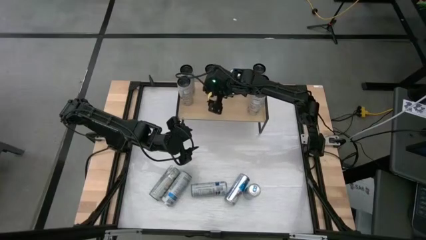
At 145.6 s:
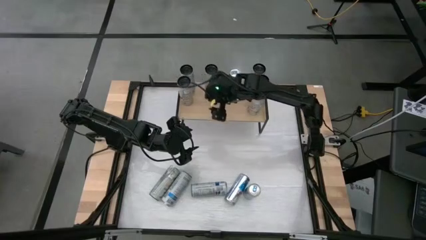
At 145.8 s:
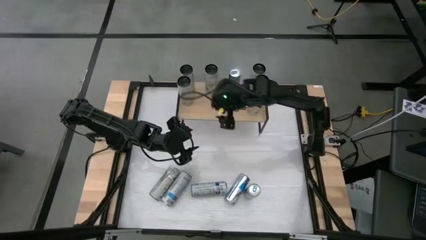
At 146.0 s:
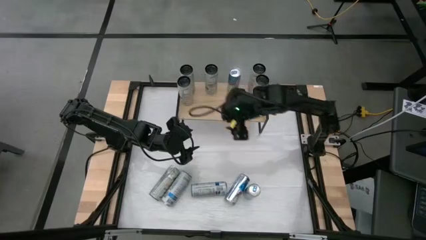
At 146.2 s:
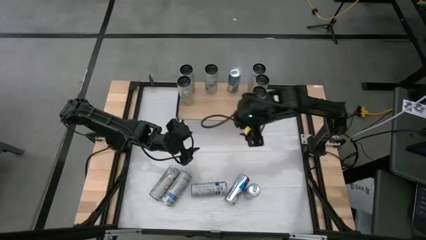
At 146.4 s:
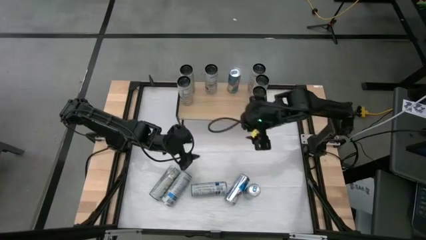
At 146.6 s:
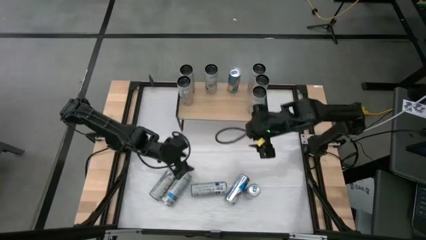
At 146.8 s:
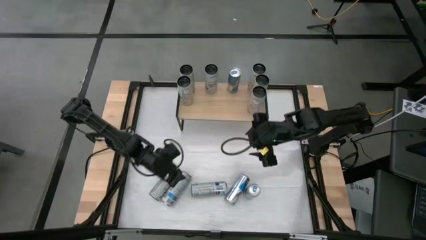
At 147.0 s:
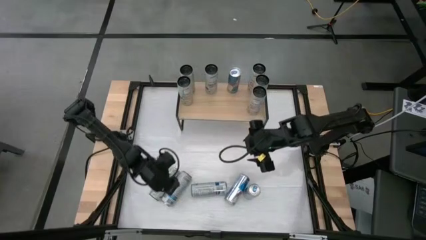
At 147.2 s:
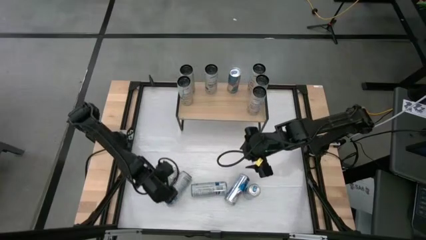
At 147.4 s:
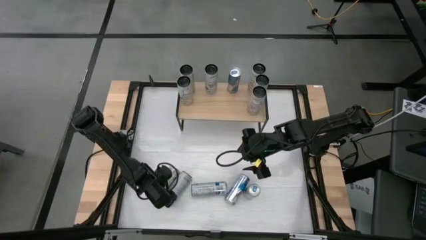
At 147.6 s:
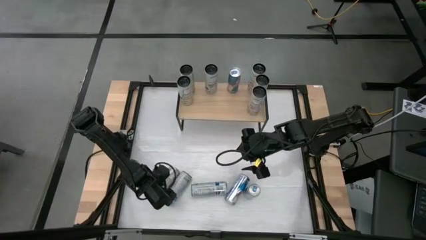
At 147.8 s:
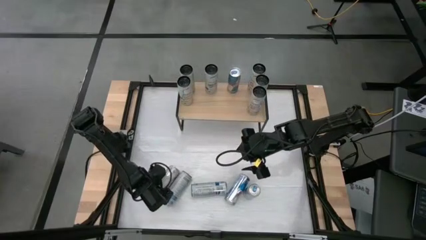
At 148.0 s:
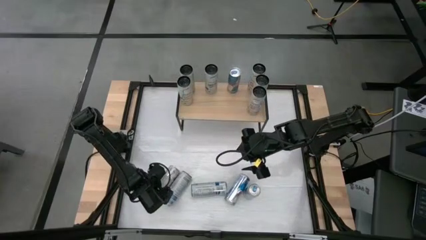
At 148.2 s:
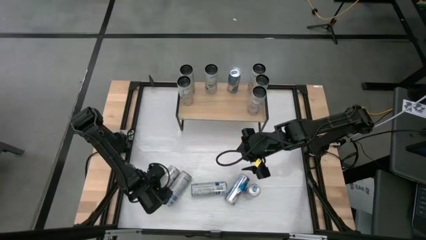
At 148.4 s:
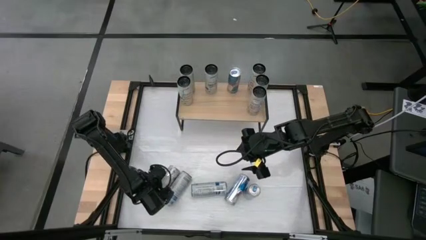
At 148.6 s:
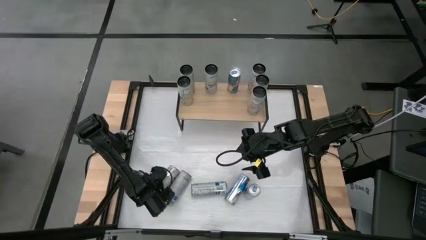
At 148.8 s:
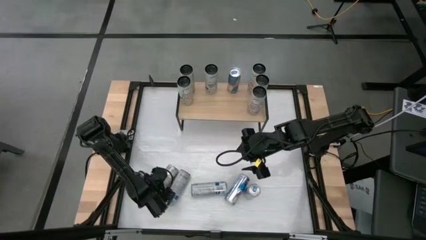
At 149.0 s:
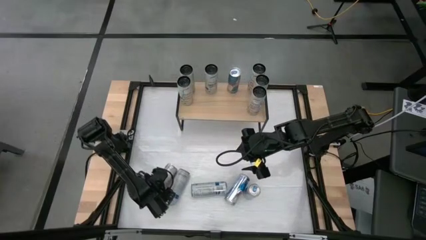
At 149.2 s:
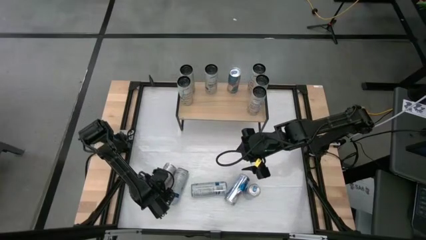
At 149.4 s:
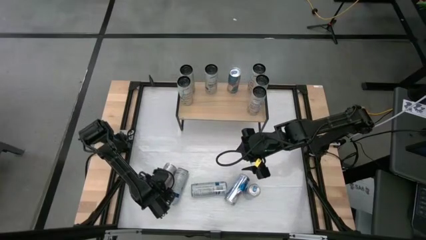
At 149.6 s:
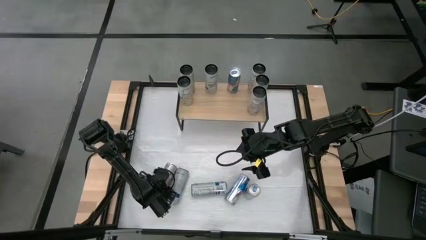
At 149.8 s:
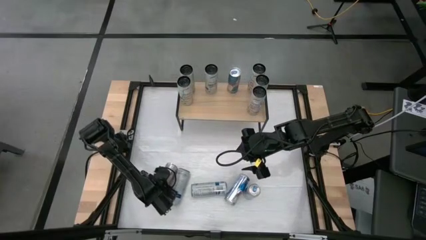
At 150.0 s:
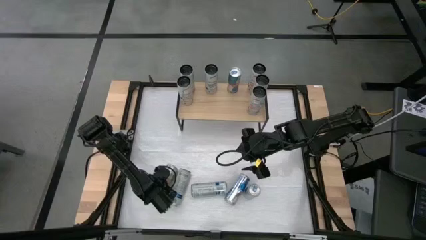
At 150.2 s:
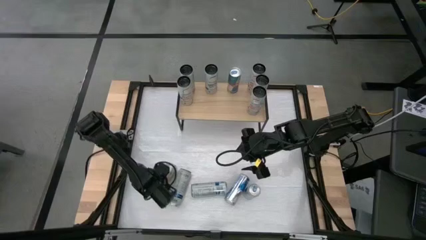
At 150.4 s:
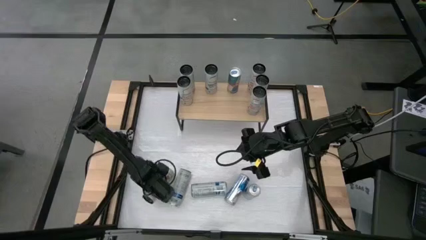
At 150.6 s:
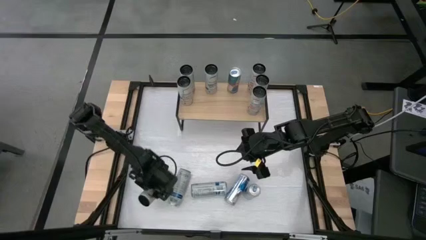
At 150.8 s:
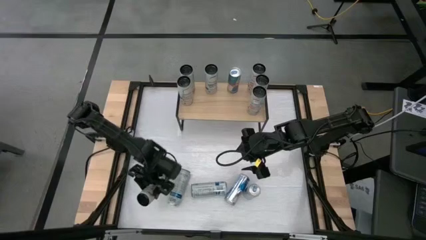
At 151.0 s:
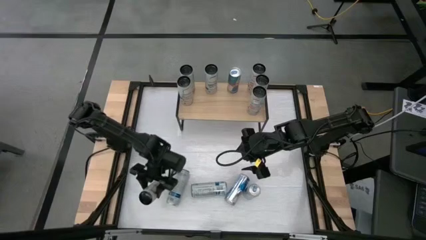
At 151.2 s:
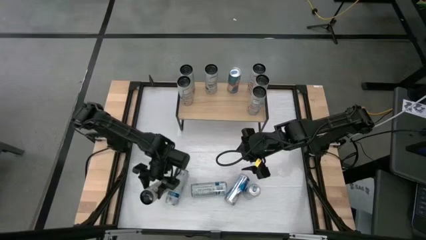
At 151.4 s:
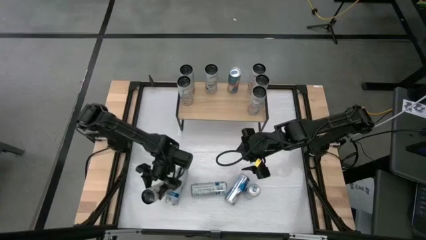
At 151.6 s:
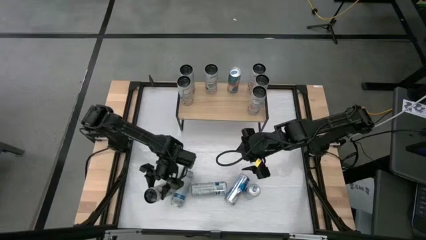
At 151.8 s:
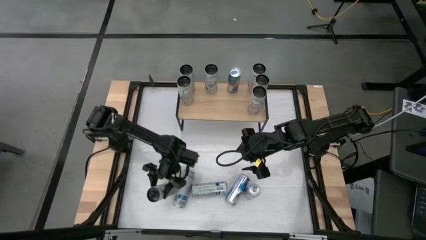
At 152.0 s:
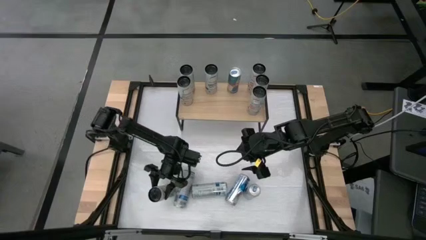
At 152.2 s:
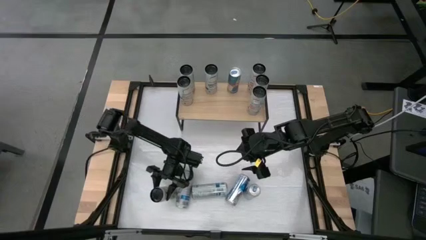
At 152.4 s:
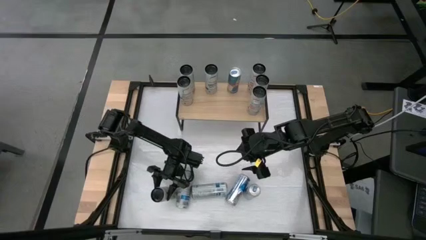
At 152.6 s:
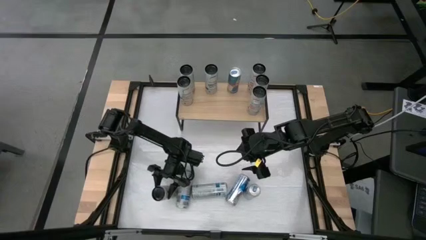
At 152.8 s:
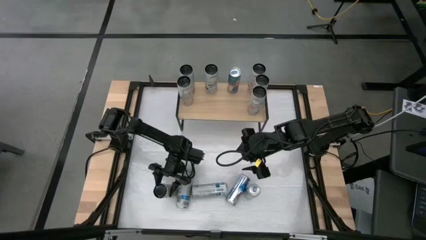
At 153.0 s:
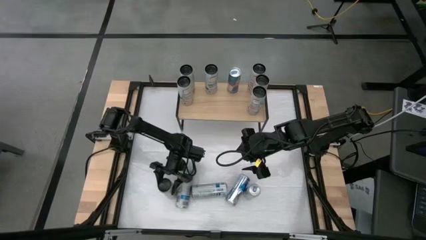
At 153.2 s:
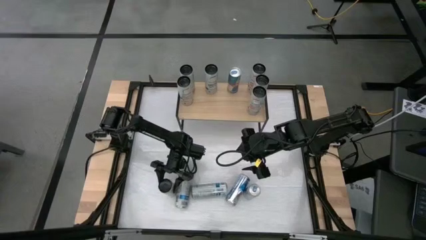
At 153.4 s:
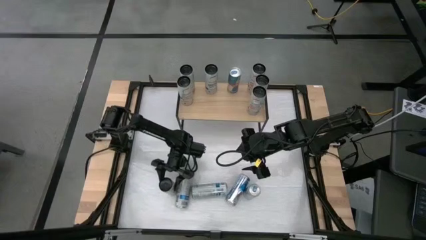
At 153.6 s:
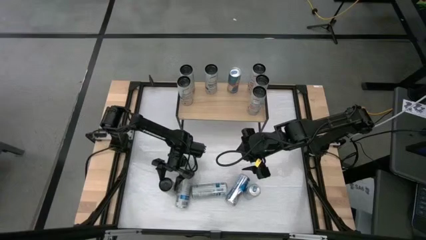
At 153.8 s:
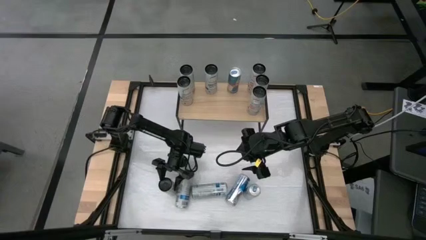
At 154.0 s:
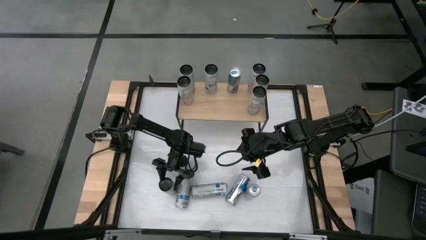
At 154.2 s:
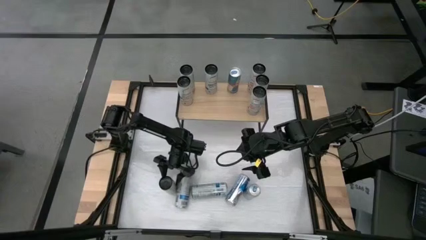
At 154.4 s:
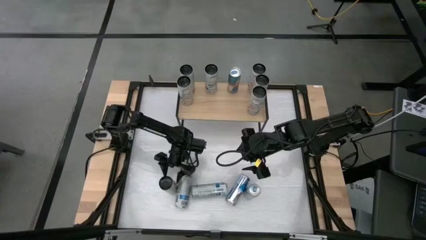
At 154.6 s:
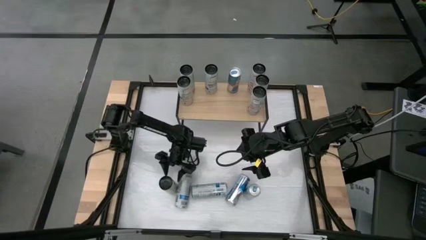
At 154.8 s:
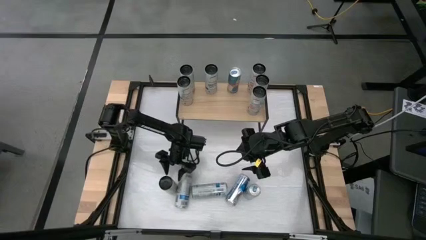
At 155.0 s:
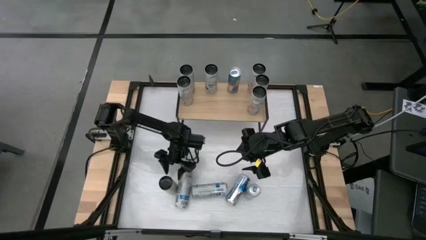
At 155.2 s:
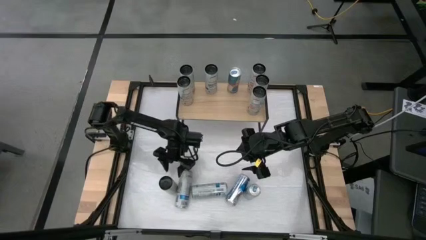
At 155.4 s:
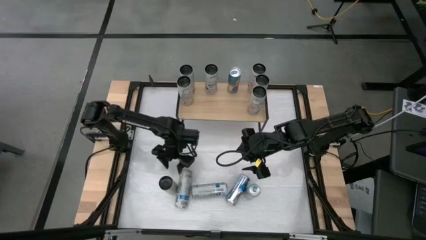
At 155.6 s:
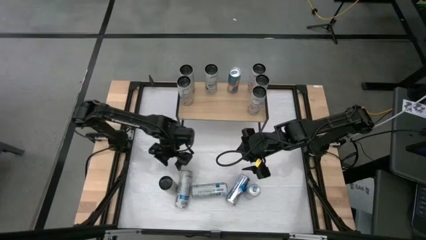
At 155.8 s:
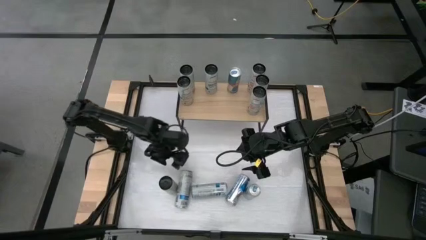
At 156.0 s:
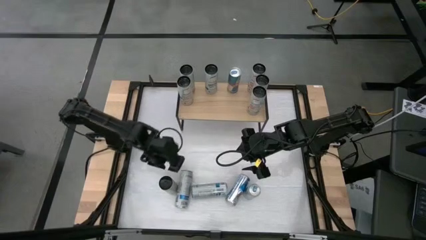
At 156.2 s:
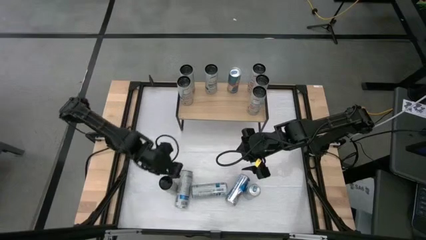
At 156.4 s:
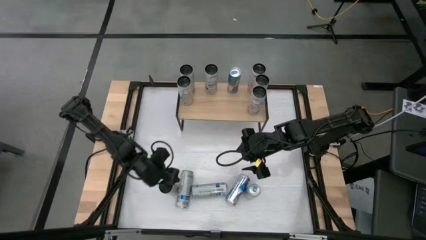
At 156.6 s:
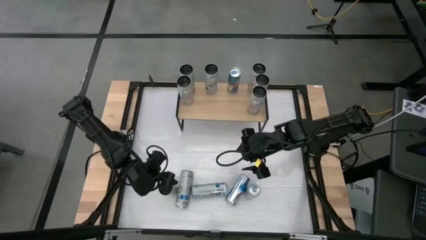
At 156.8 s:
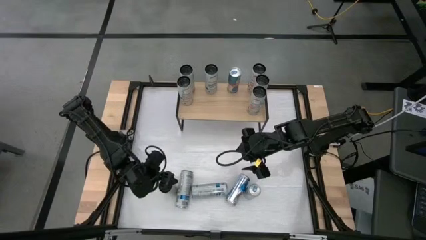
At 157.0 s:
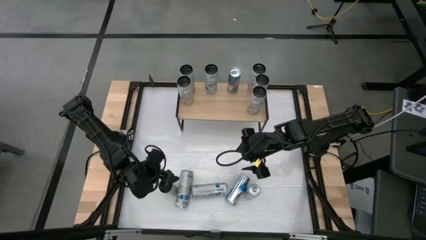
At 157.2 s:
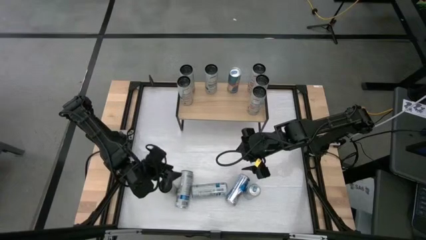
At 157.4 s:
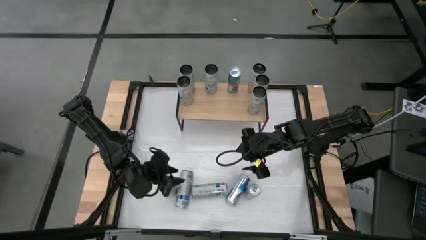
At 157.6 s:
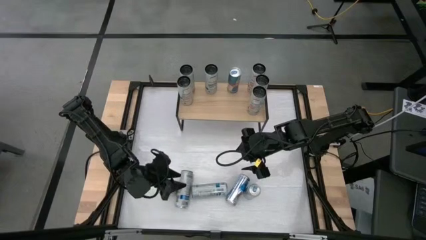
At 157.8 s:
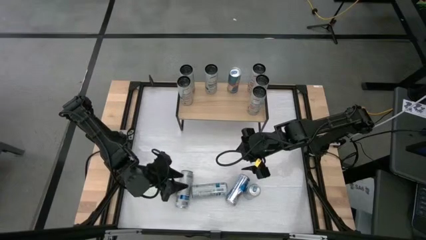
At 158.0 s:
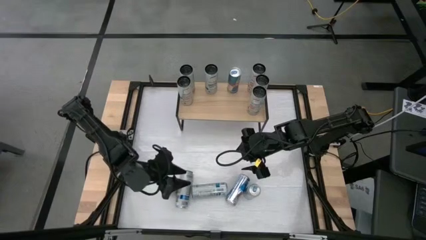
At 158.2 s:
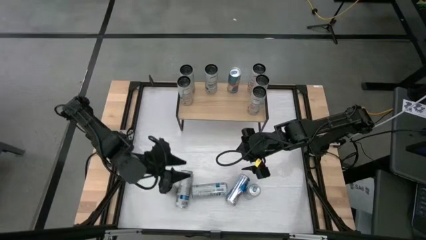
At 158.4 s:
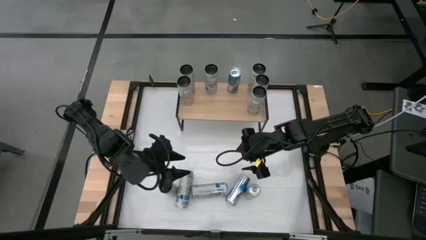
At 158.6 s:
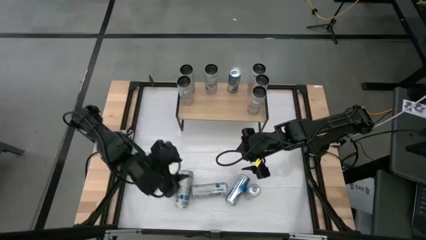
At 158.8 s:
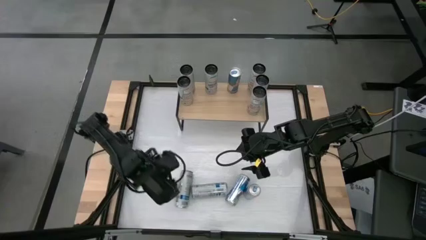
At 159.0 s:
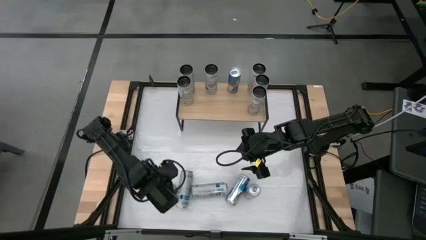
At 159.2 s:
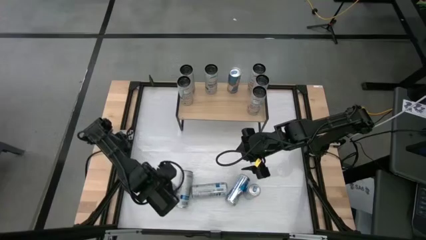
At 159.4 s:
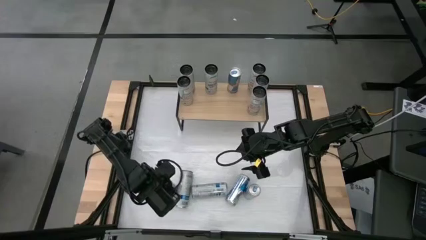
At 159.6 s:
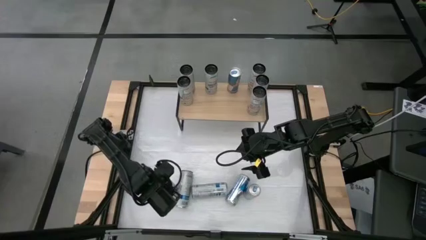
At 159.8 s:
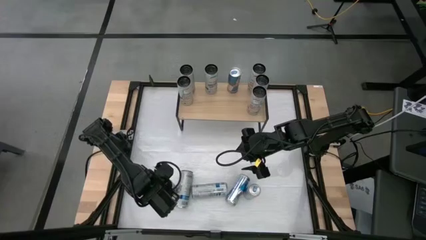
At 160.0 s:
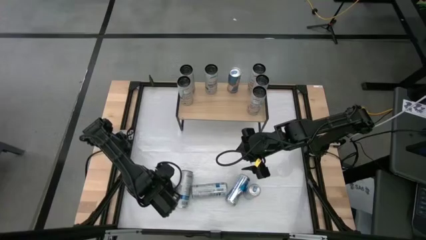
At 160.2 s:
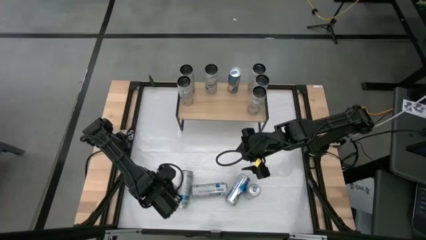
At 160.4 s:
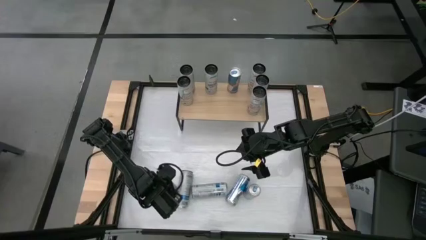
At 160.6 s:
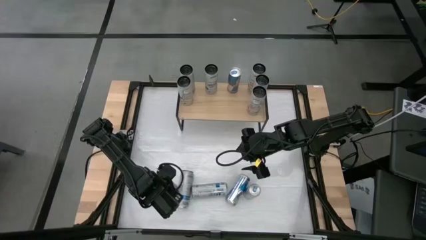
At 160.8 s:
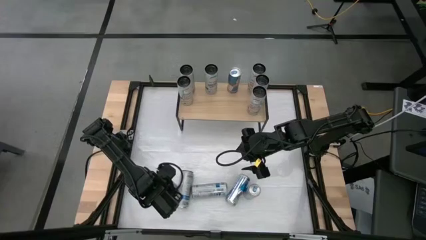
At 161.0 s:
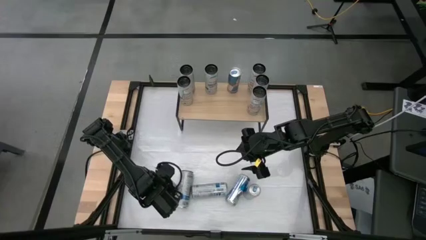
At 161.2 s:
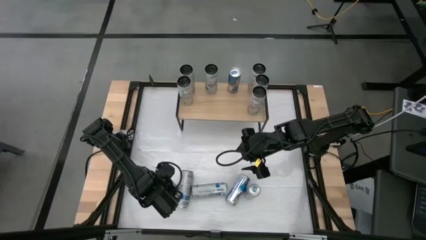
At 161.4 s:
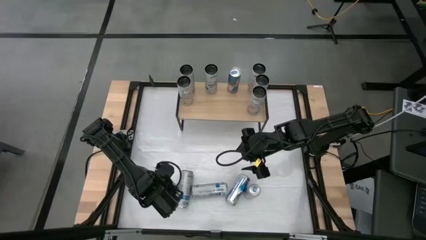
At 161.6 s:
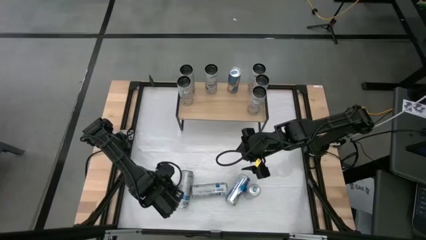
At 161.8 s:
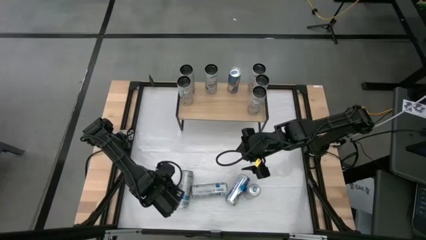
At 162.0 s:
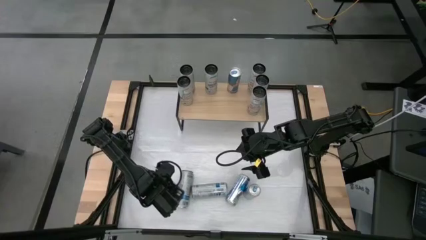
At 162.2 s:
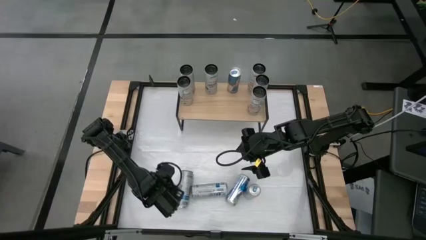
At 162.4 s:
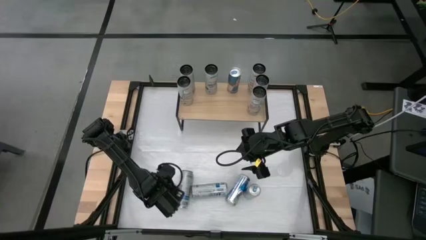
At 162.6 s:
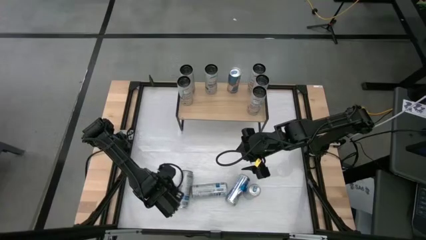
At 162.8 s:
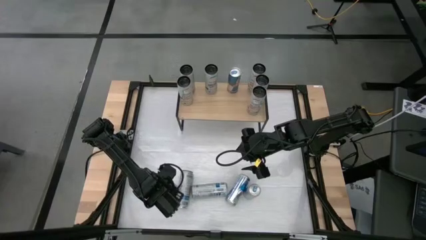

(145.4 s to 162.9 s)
Task: Sort soda cans
Put the white yellow soda can on the shelf and align with other white yellow soda cans
